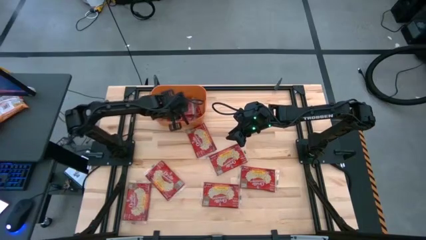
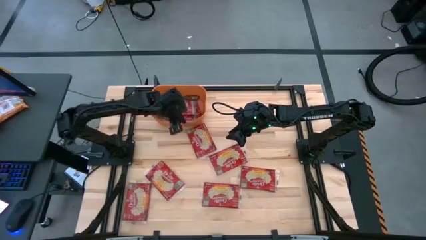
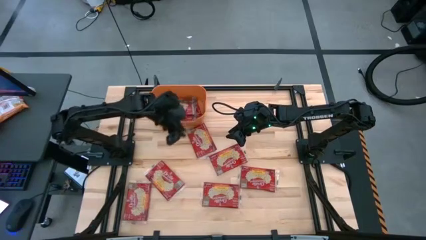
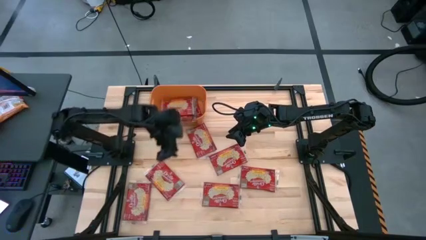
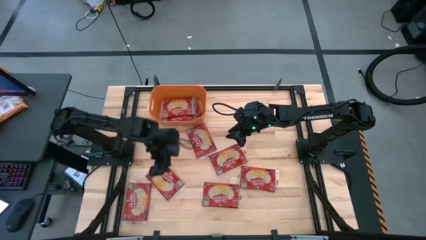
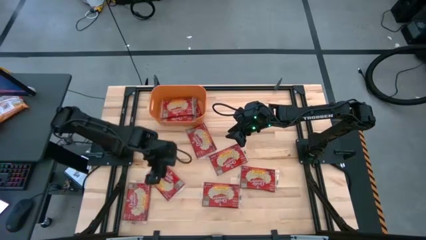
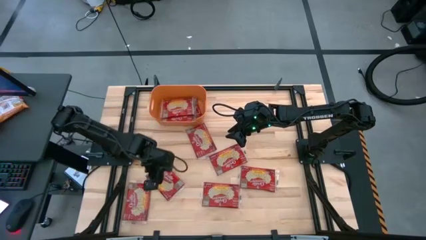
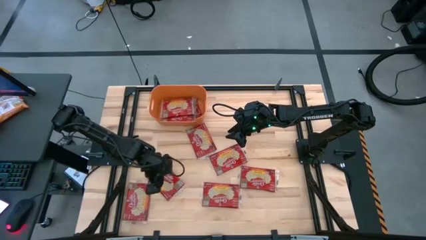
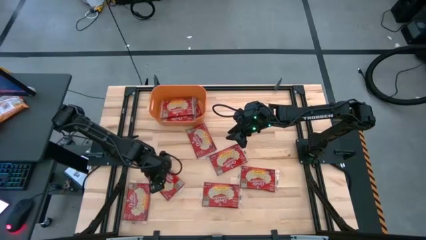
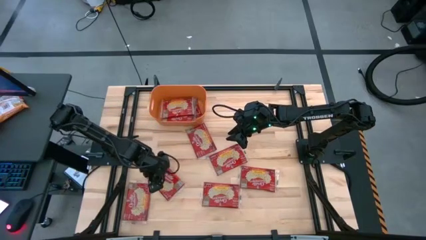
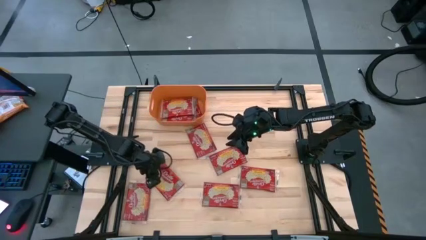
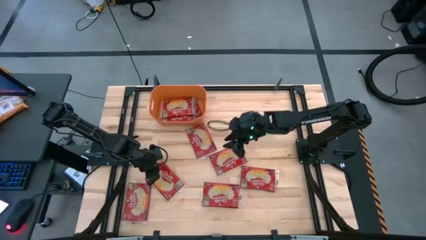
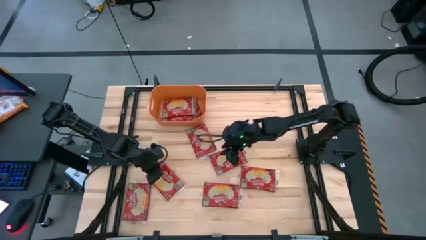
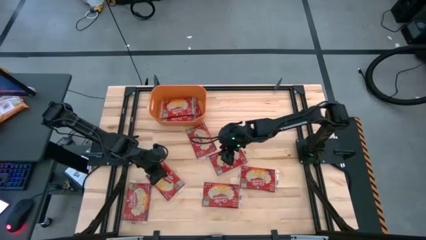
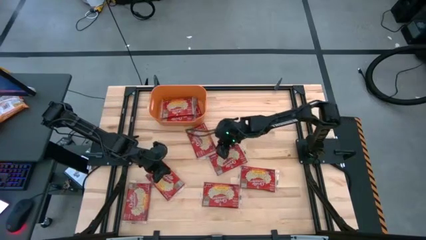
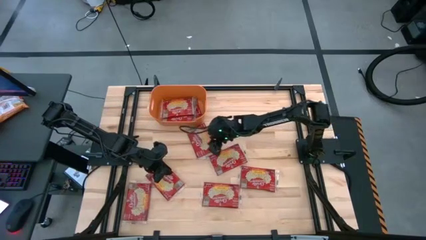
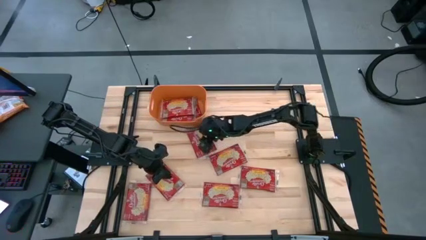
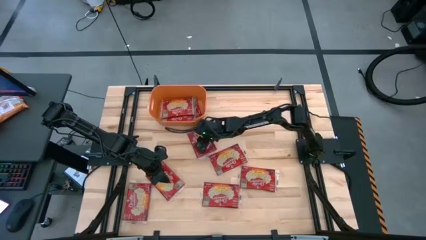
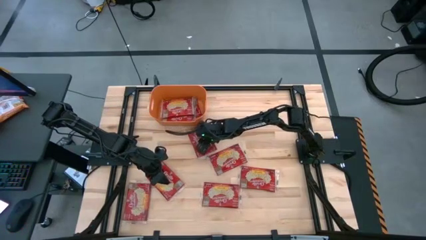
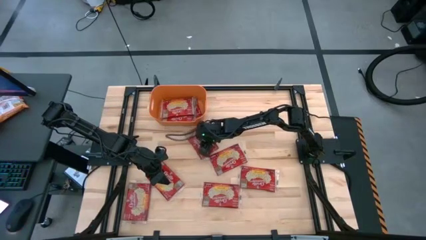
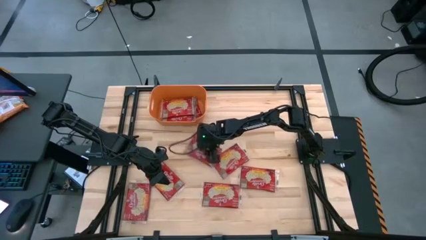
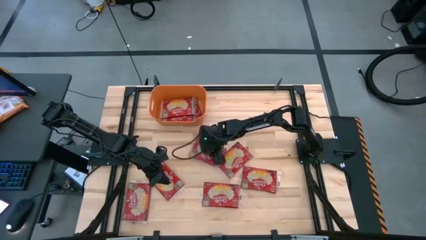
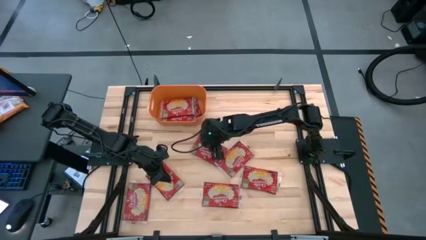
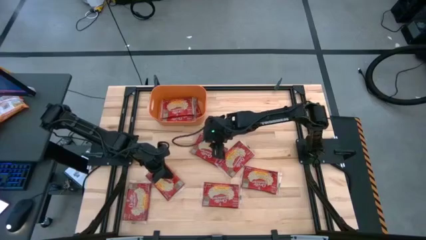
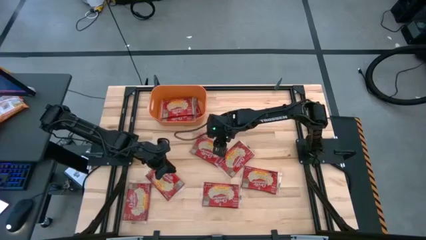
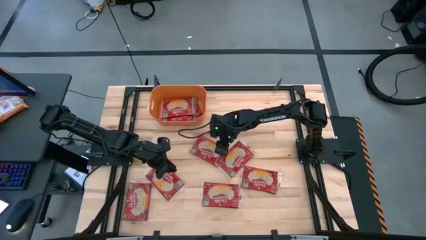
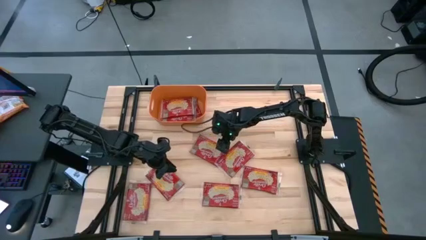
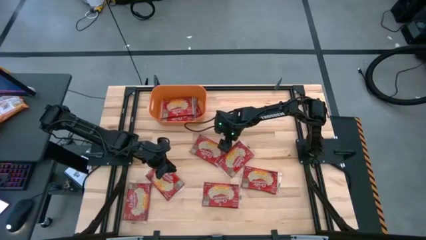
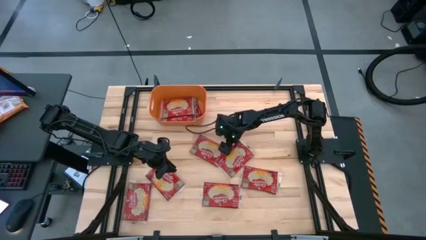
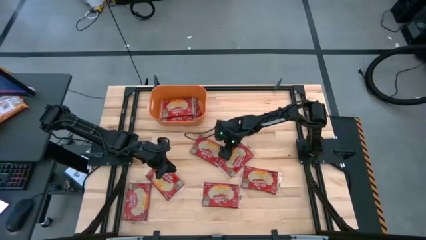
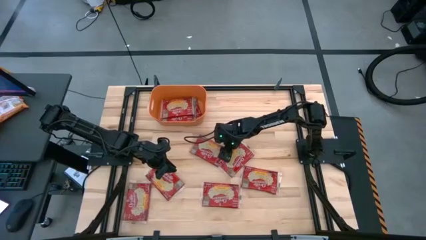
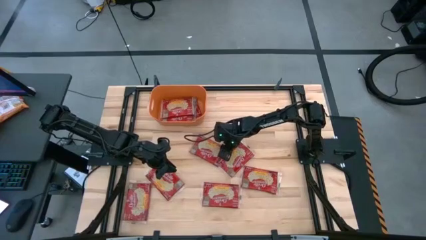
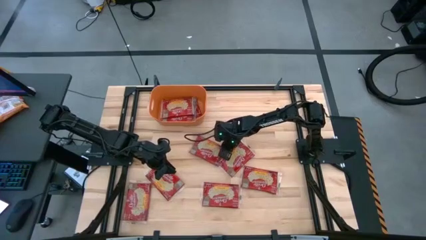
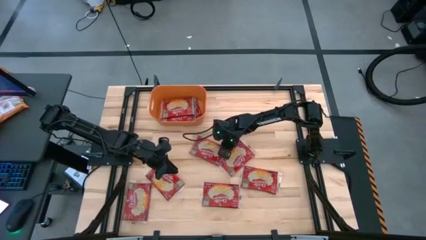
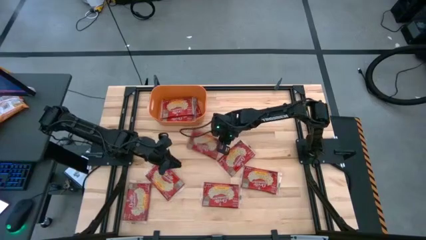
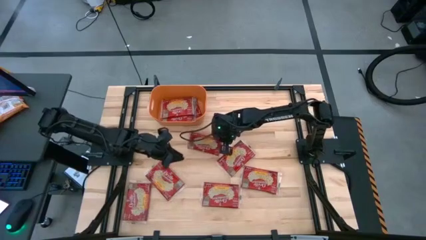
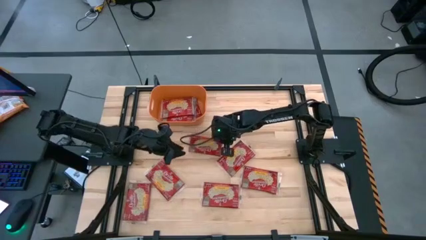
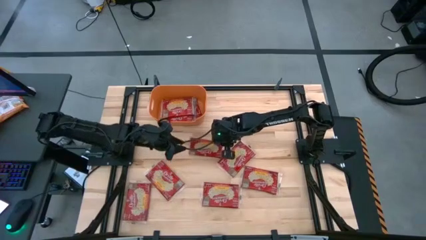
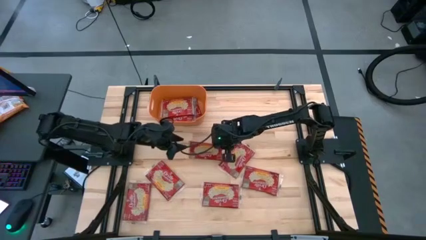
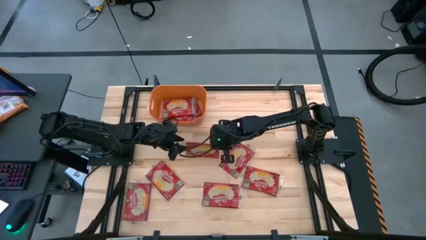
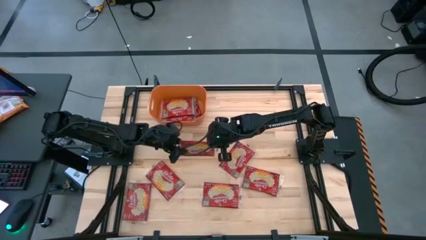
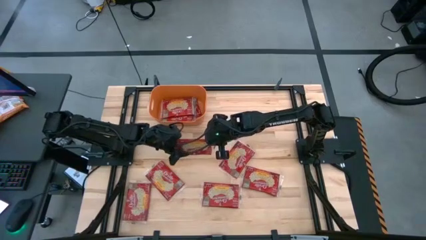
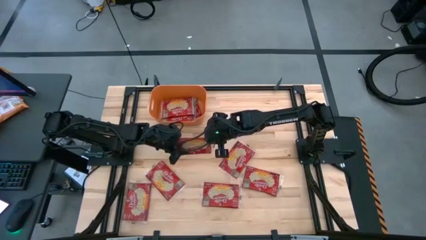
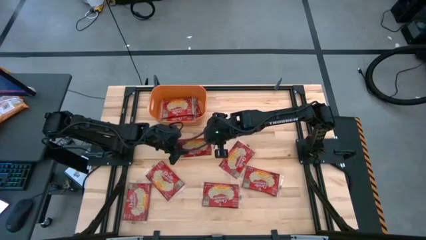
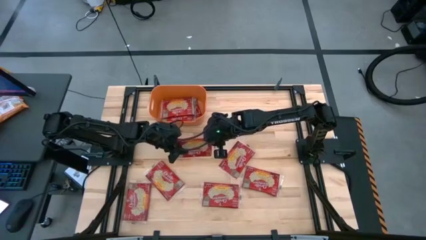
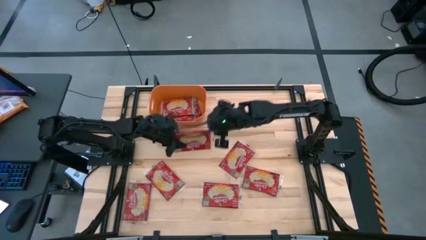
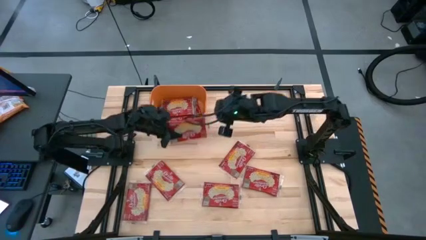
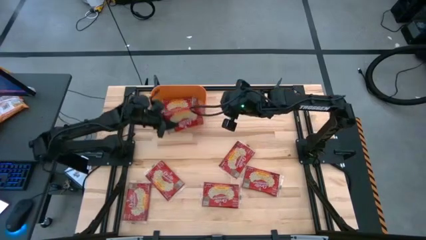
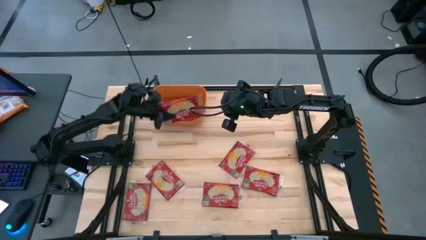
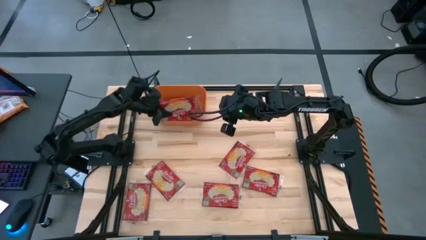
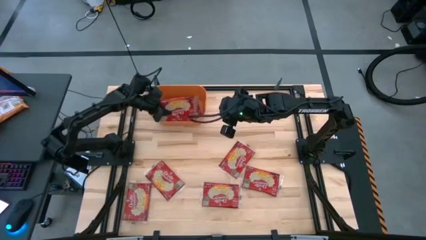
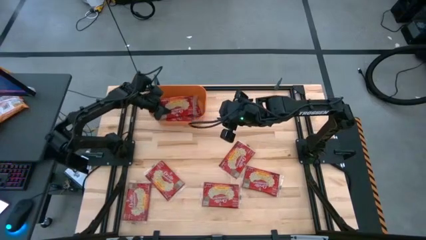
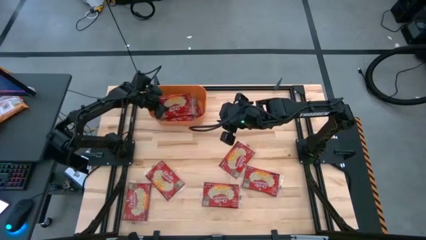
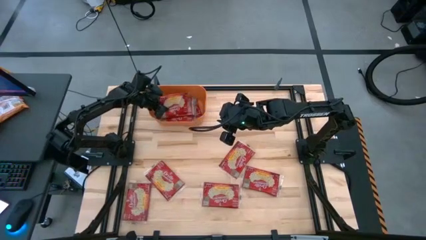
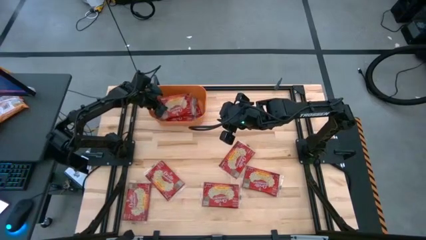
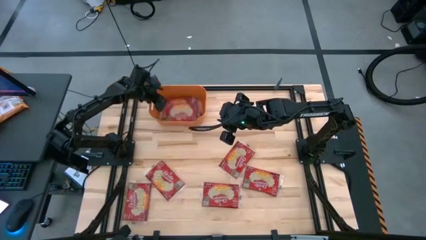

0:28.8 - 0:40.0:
Task: Sort popcorn bags into baskets
Put the red popcorn bag into the orange bin

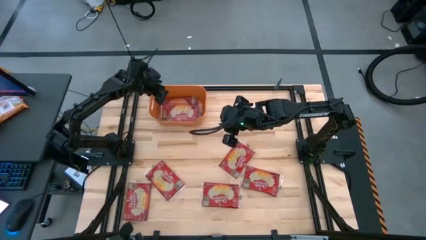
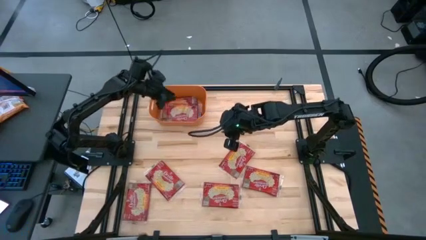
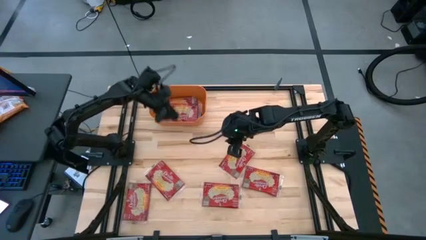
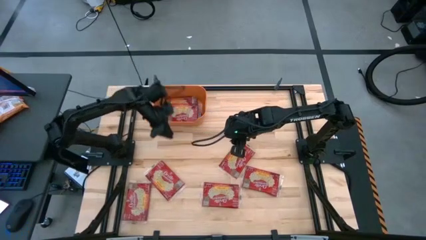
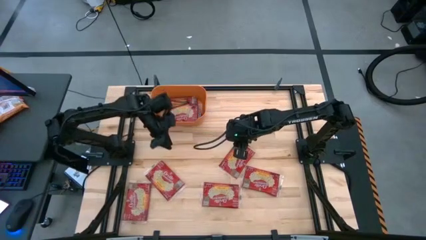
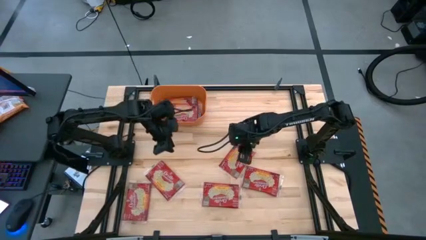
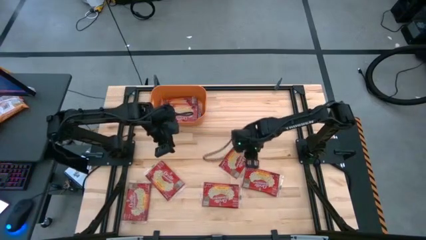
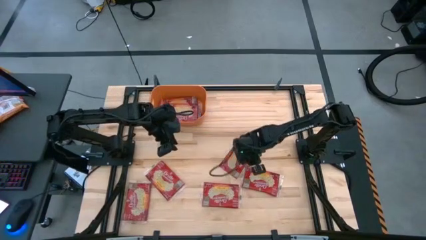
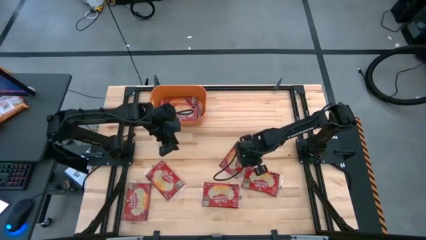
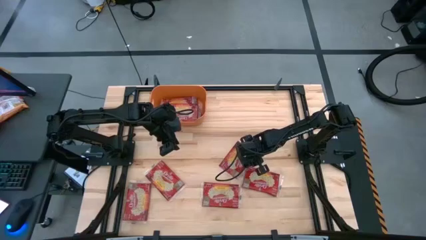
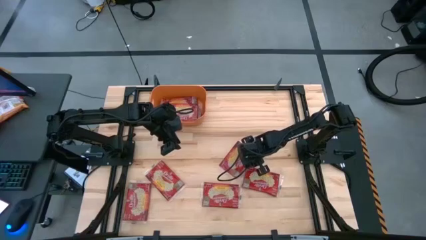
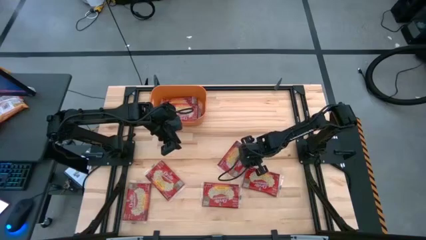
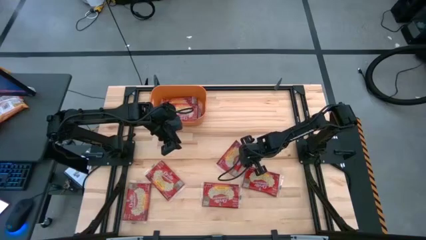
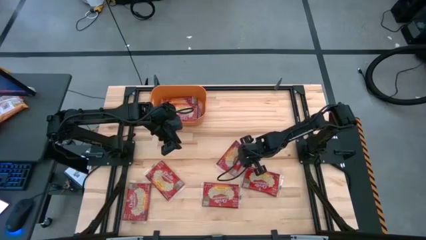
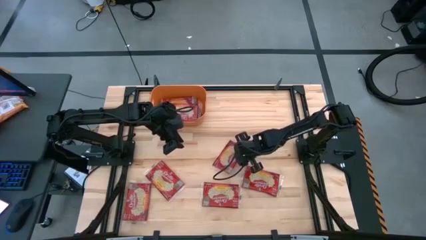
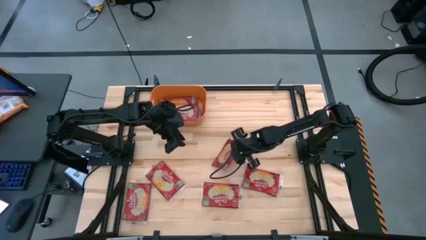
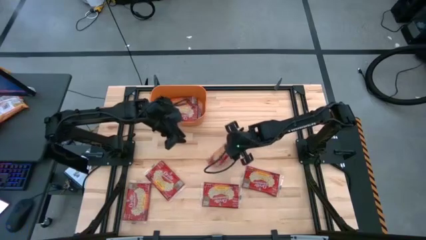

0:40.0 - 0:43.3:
Put the red popcorn bag into the orange bin

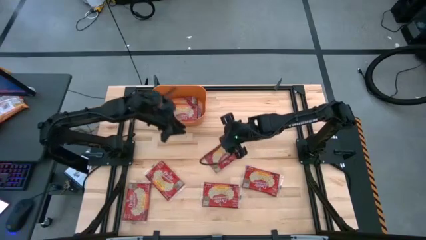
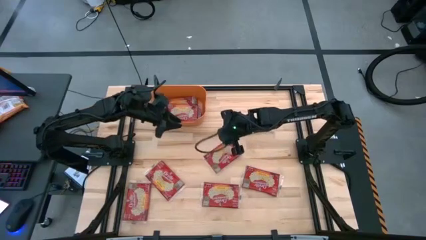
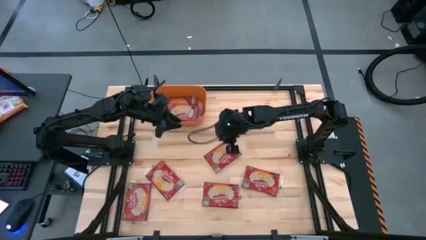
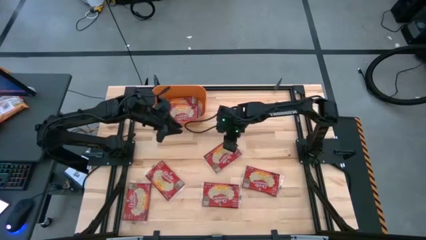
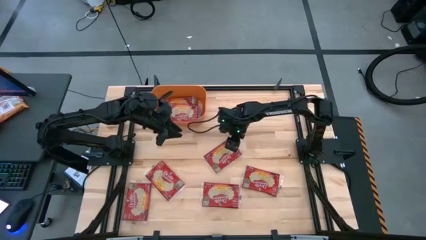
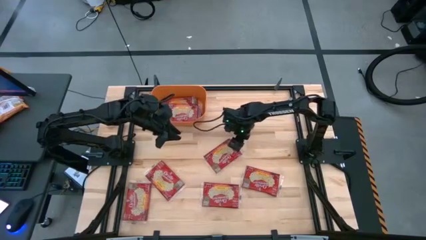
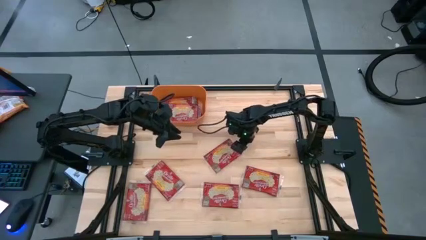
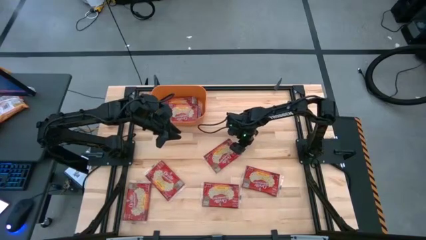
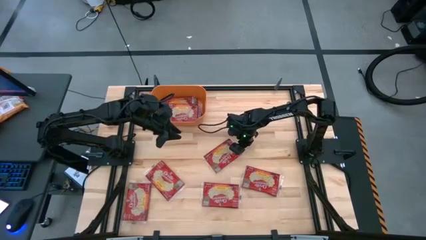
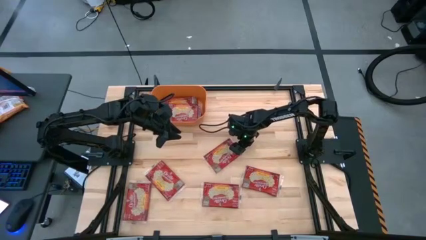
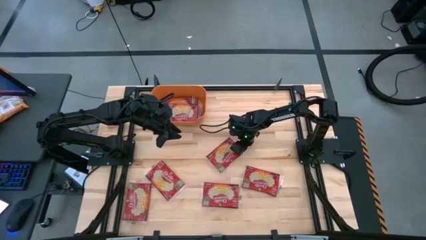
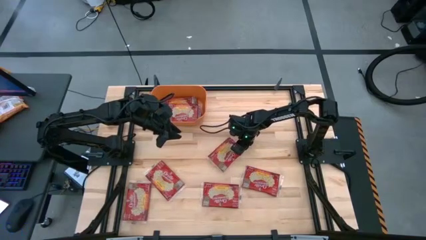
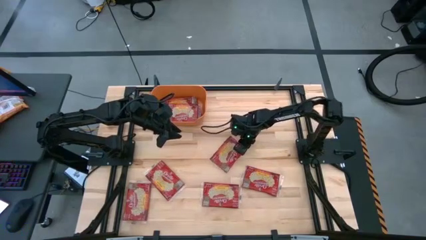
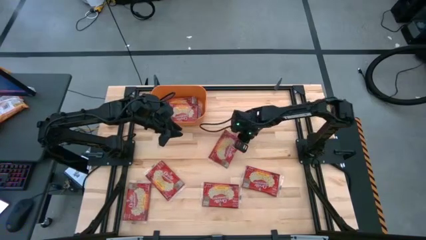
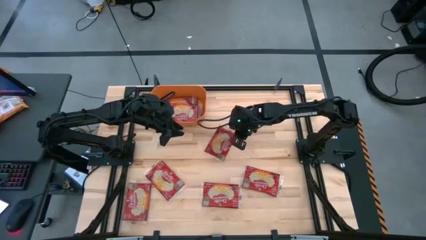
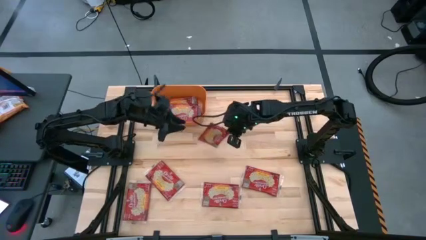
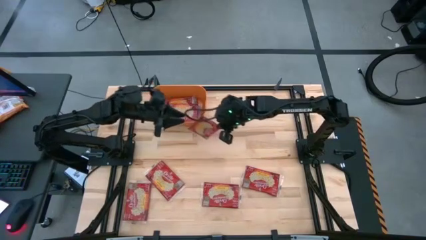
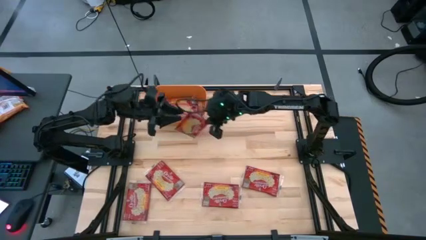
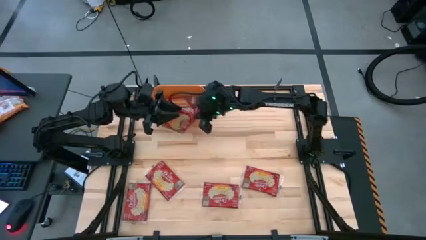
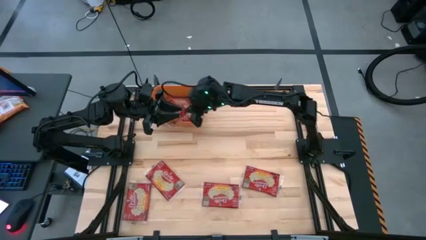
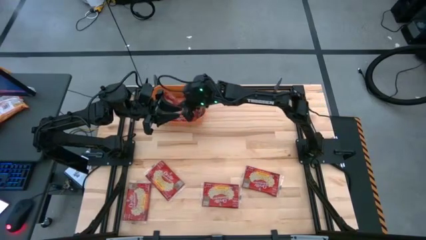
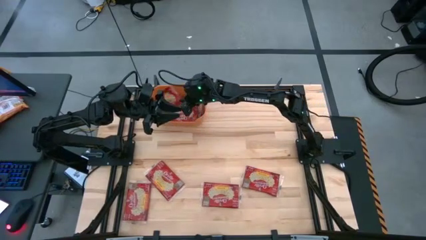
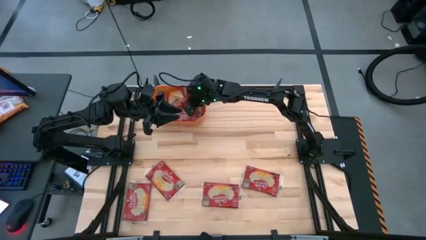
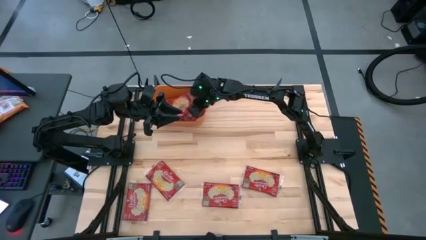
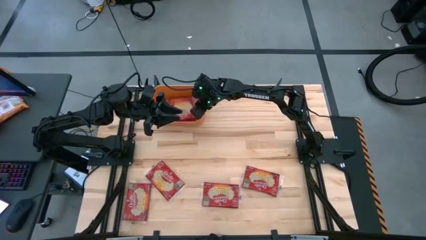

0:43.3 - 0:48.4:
Put the red popcorn bag into the orange bin
